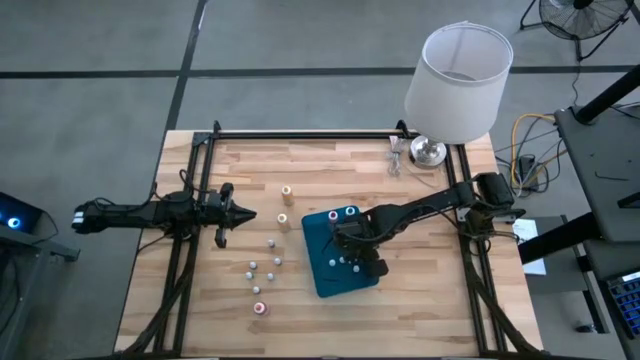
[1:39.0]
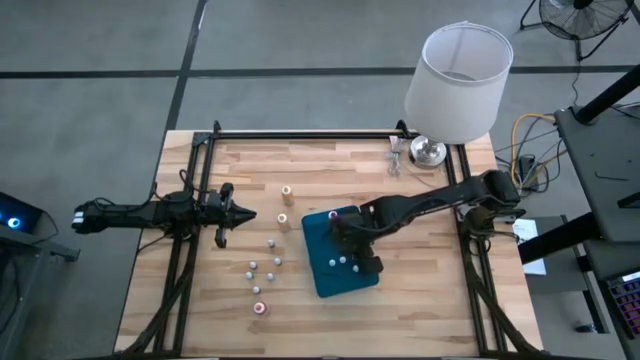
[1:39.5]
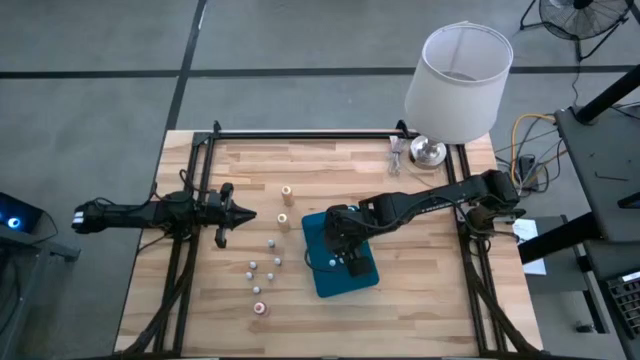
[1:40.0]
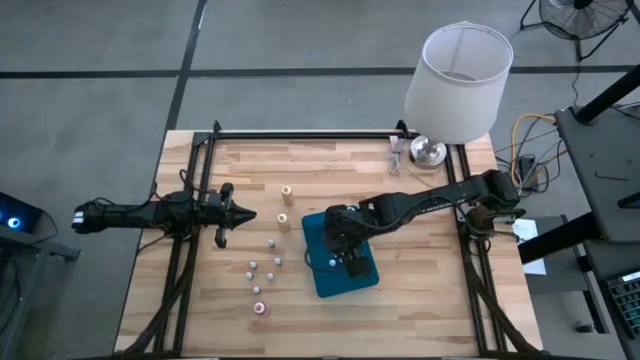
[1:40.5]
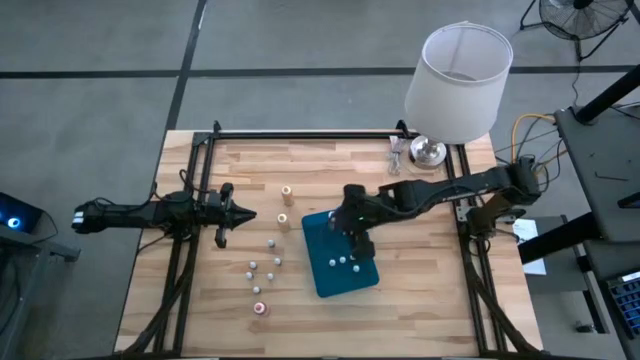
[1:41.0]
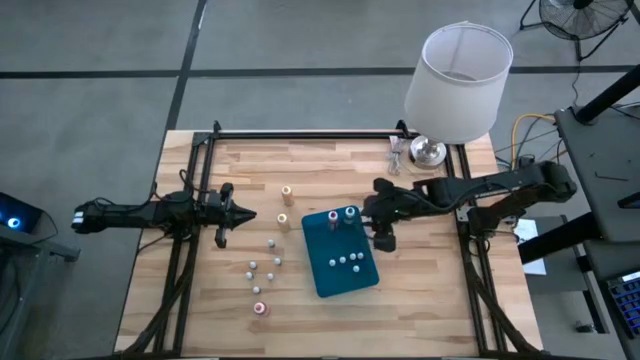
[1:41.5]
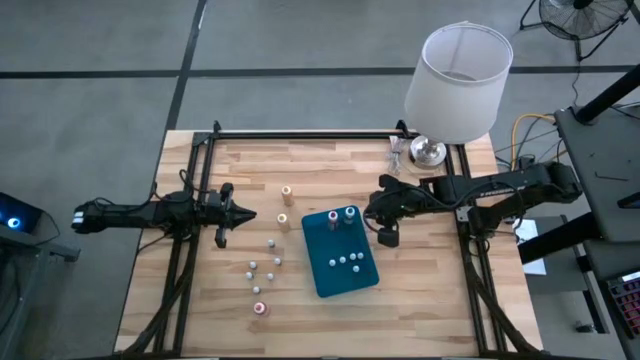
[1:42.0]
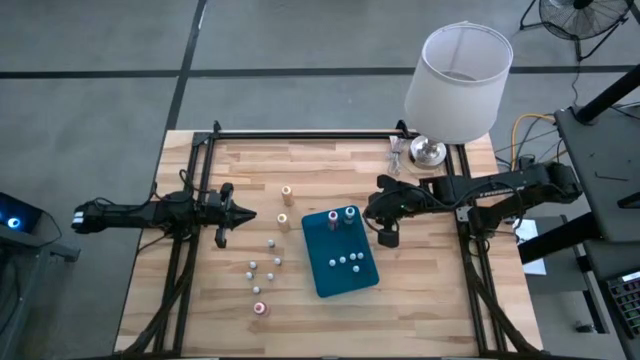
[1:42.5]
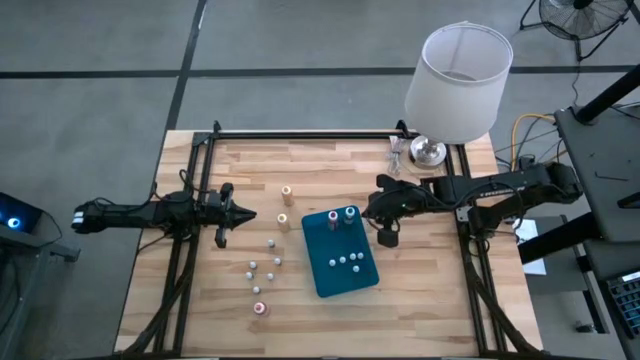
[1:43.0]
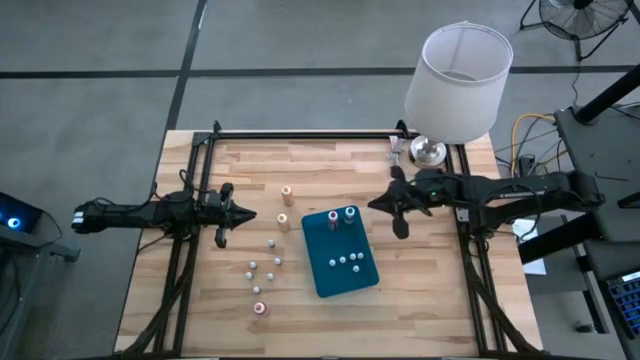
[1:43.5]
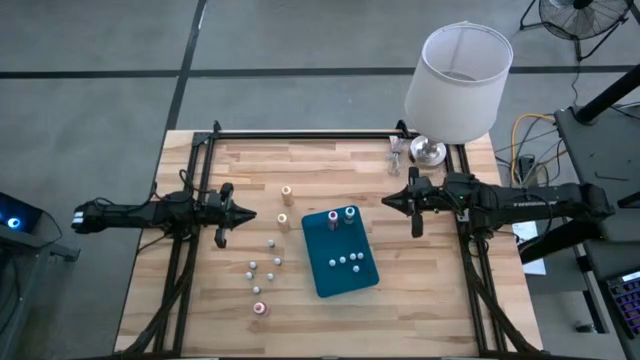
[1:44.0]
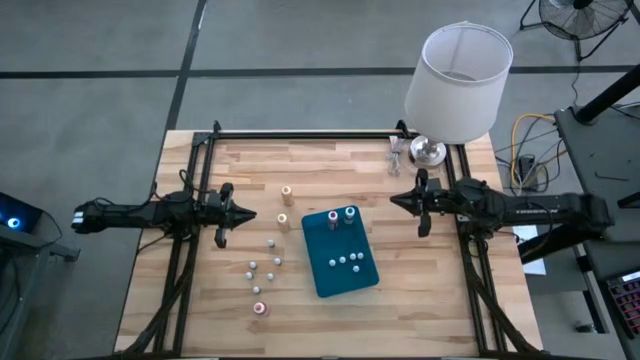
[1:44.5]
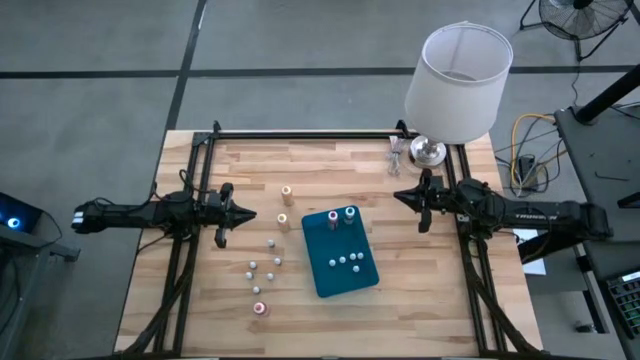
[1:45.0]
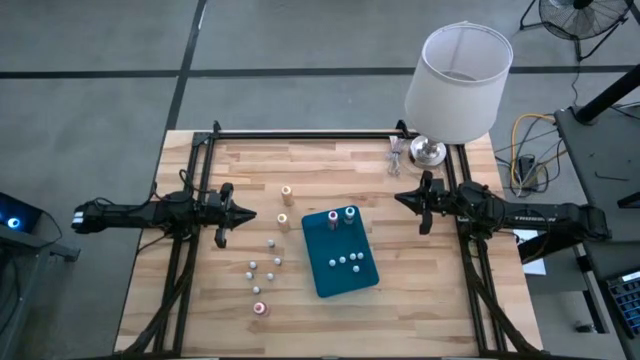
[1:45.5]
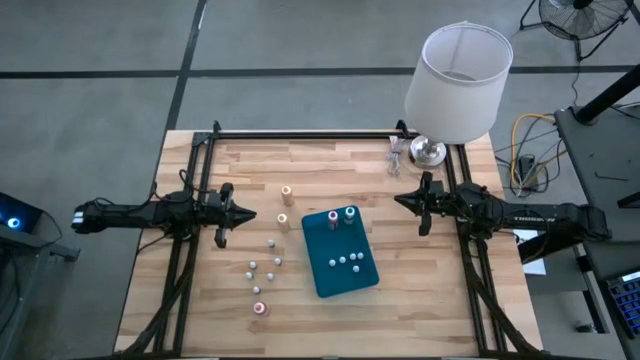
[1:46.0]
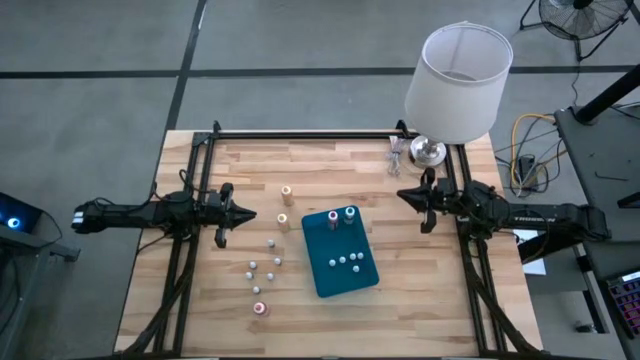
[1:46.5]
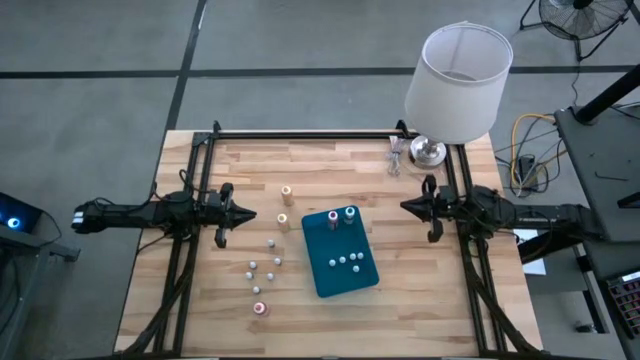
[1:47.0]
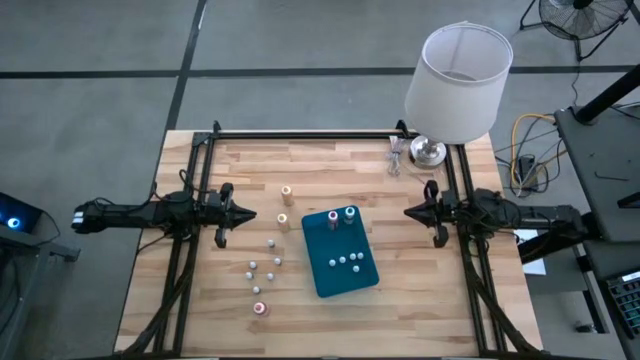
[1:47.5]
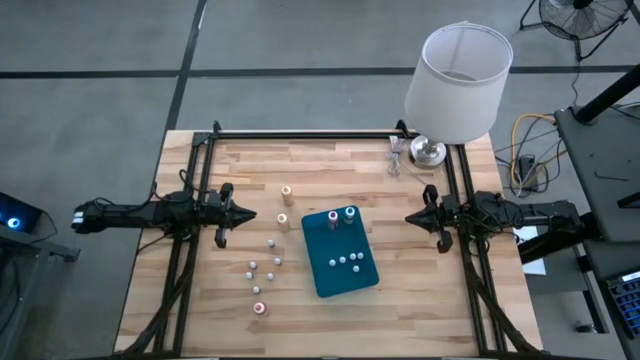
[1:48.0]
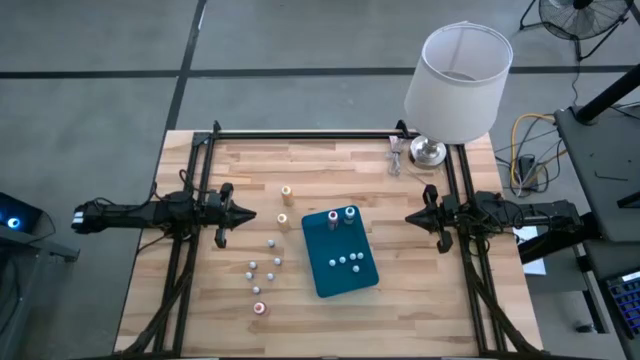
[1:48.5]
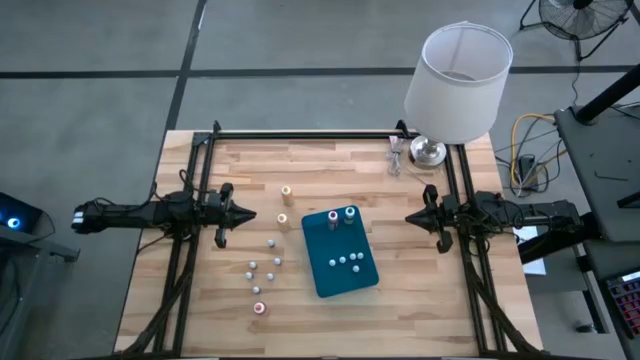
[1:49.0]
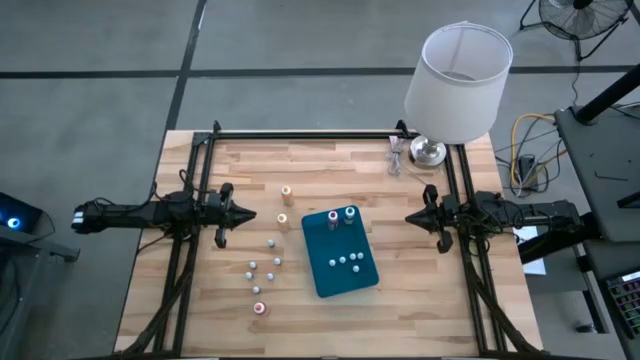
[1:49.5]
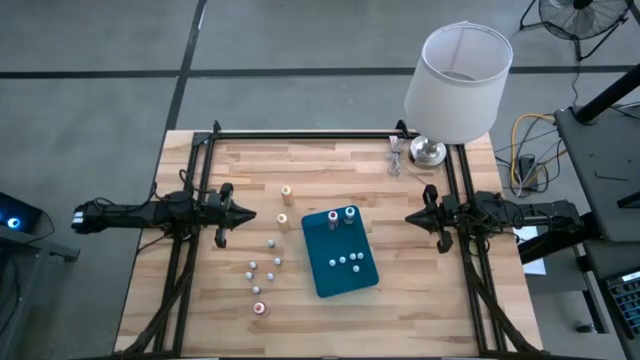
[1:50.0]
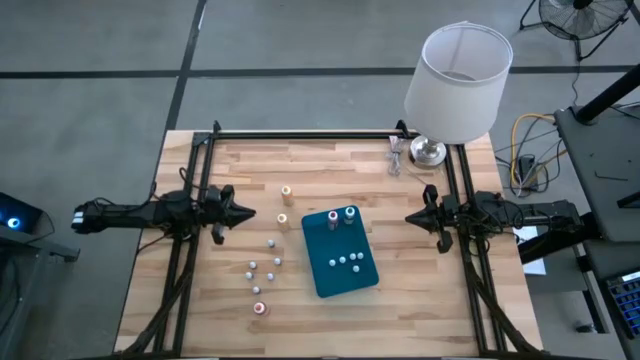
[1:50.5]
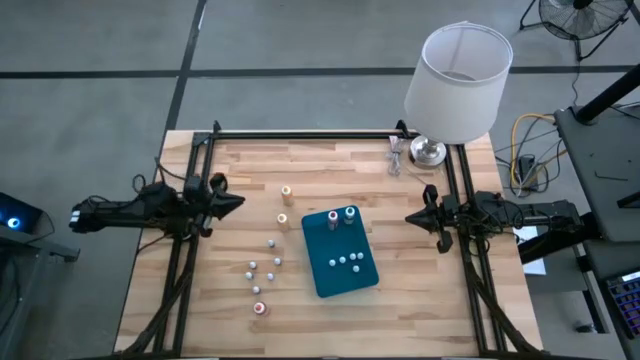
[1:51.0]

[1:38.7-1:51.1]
Task: Pick & Place food coloring
Put the top large yellow food coloring bottle into the blue bin

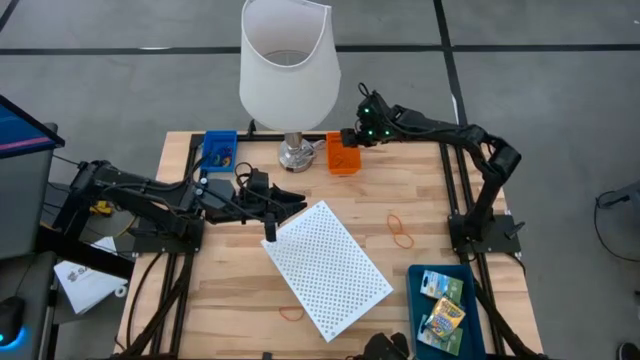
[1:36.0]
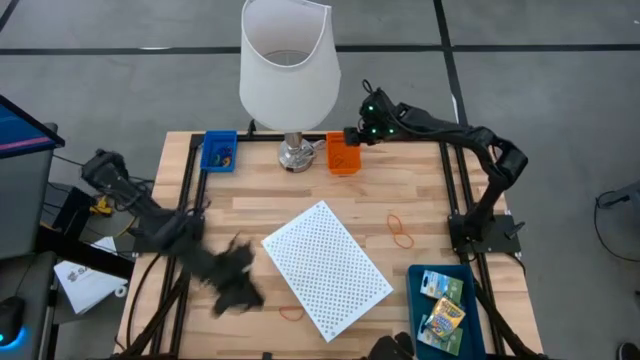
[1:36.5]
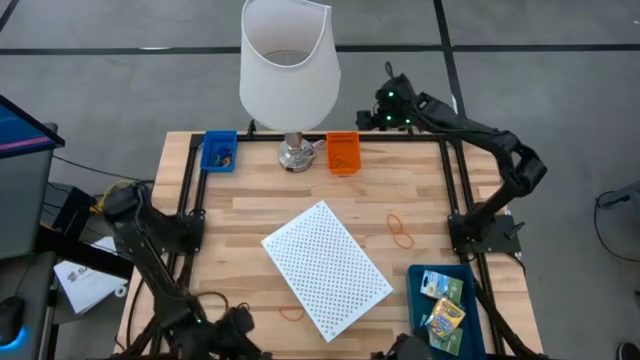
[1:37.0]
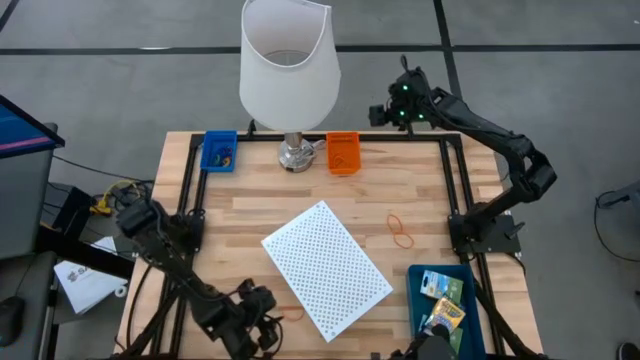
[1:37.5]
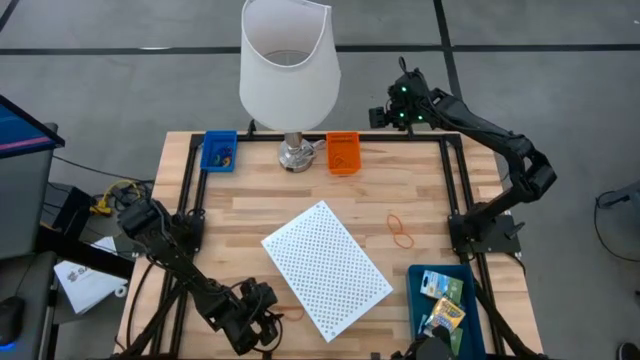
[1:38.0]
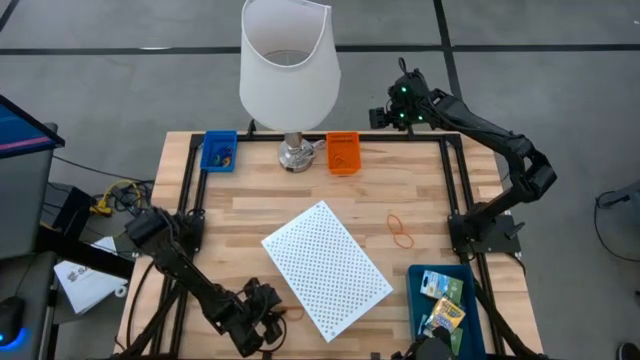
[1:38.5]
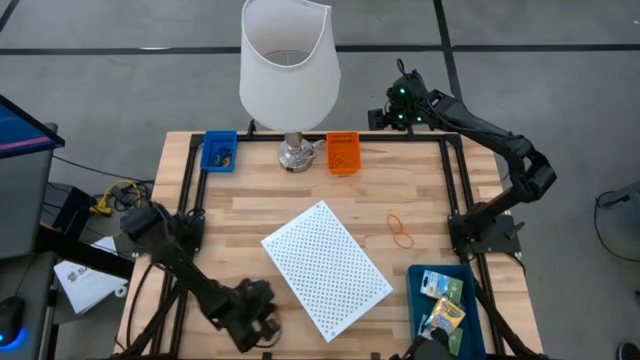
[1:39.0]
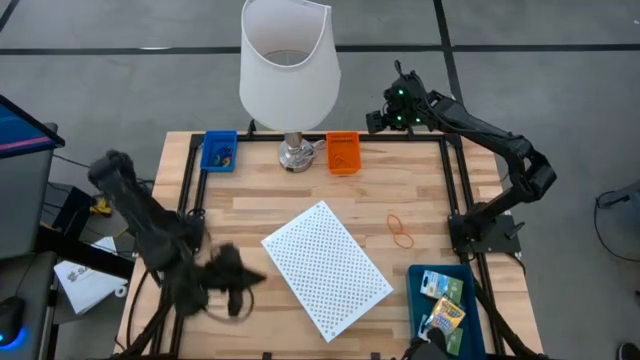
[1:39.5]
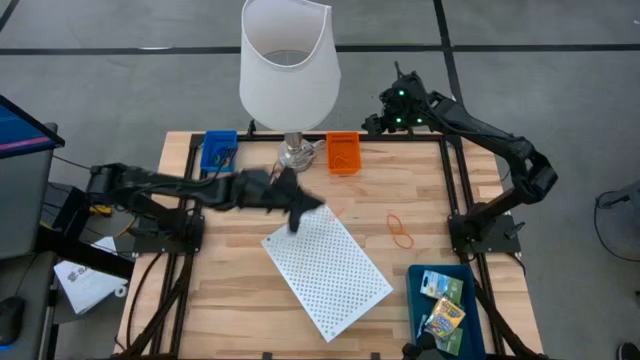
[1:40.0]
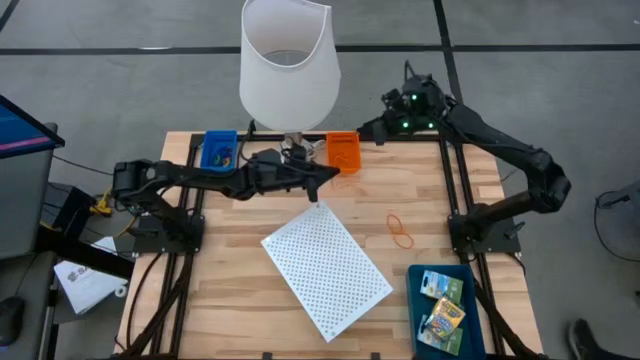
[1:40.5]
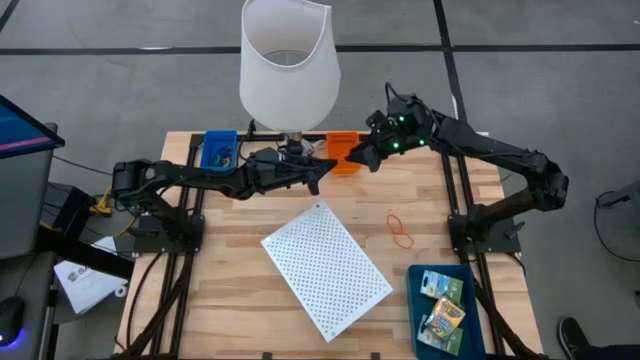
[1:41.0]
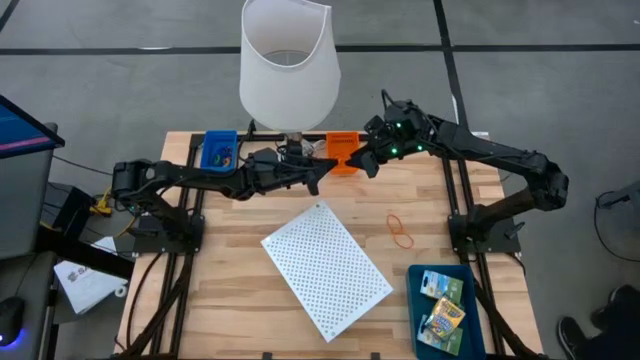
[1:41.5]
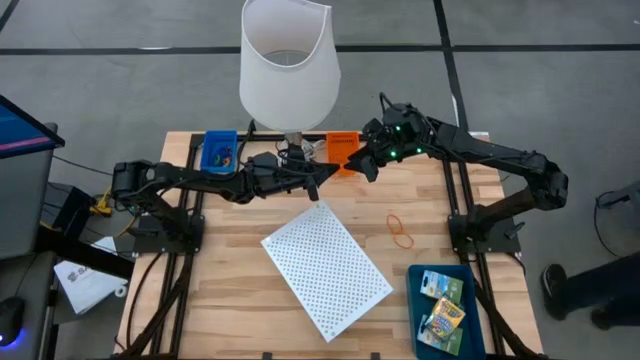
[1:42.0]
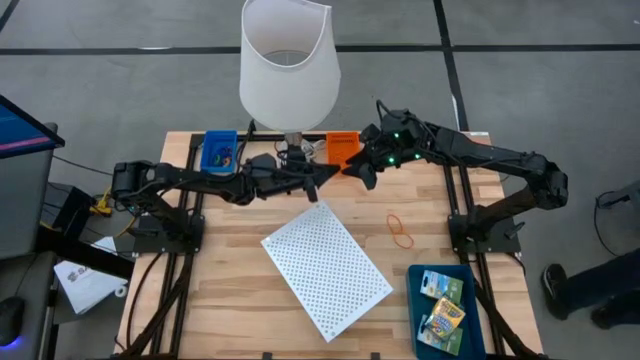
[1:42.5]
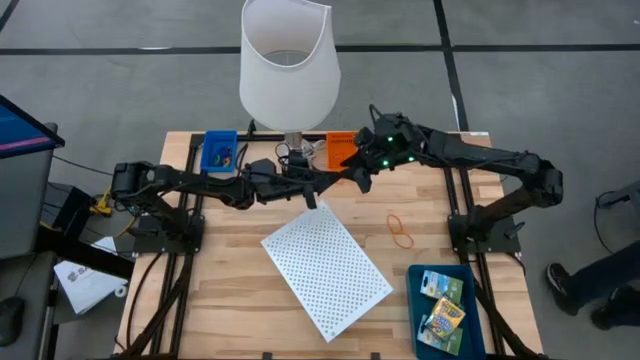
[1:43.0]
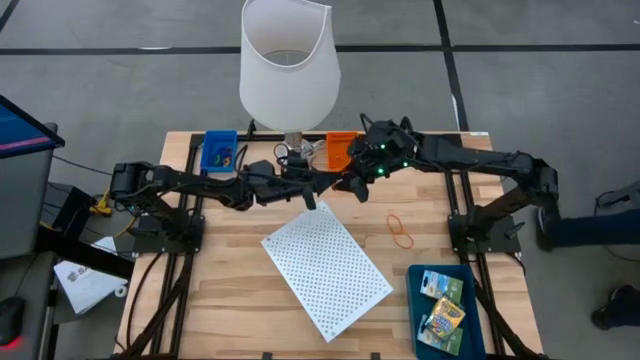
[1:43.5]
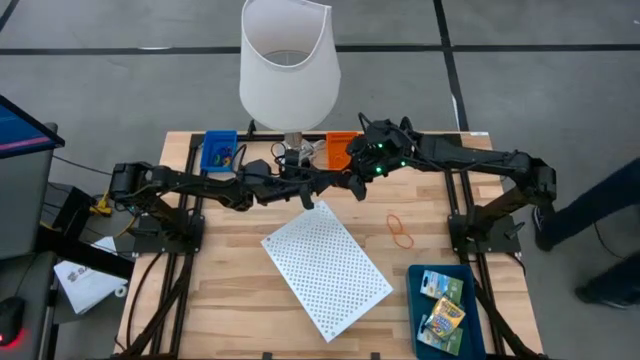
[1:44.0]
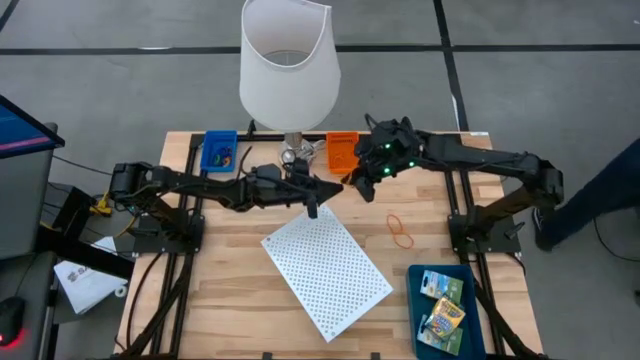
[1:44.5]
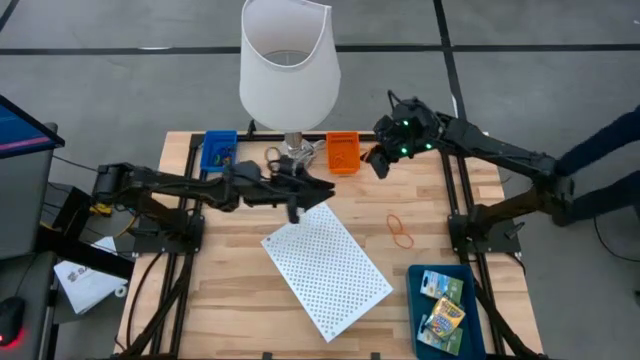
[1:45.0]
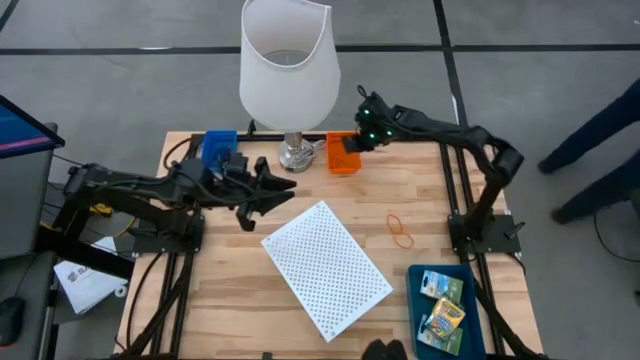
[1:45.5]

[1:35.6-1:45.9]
Task: Pick & Place Office Desk Supplies
Put the orange rubber band into the blue bin
